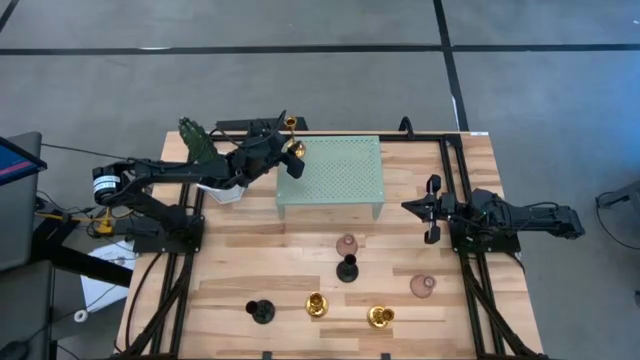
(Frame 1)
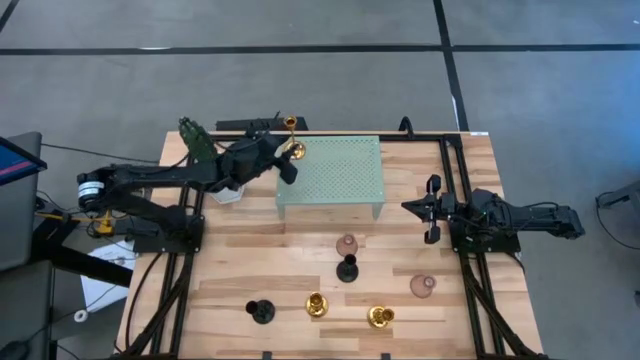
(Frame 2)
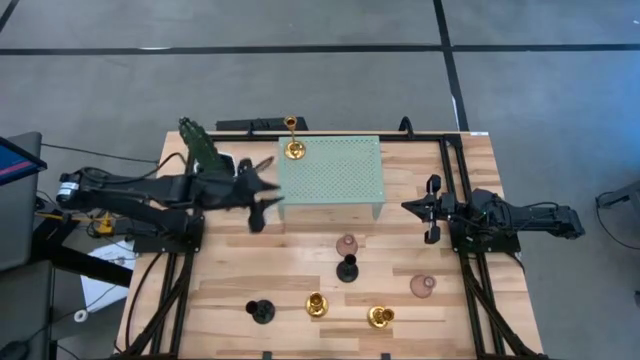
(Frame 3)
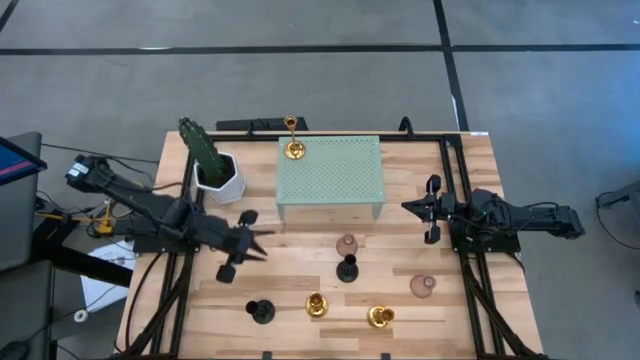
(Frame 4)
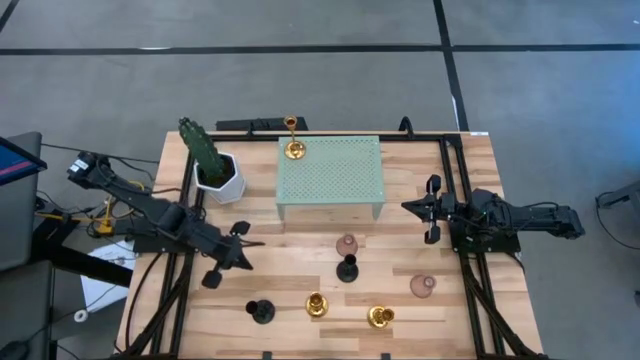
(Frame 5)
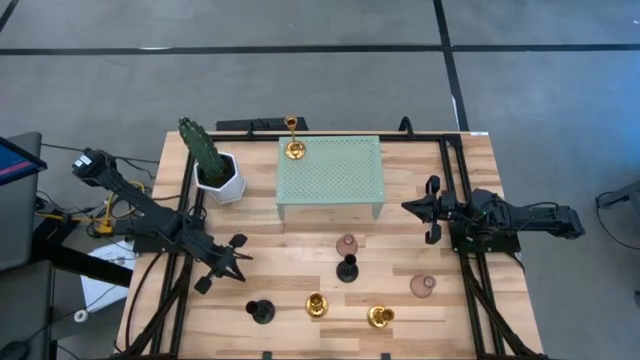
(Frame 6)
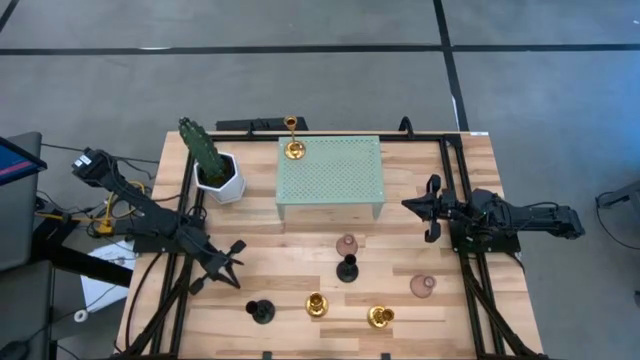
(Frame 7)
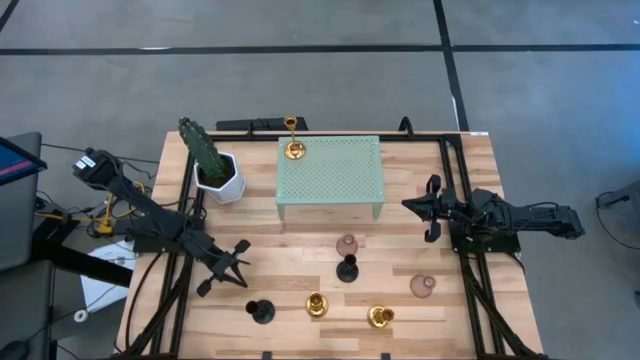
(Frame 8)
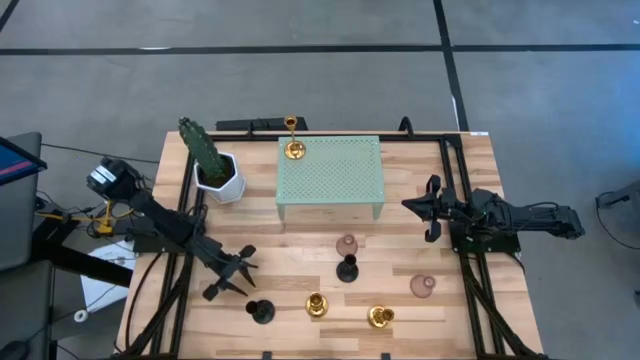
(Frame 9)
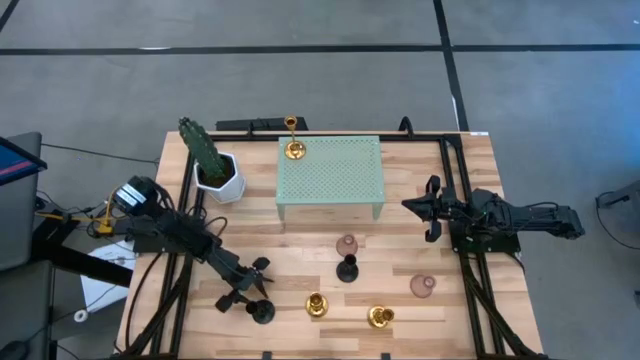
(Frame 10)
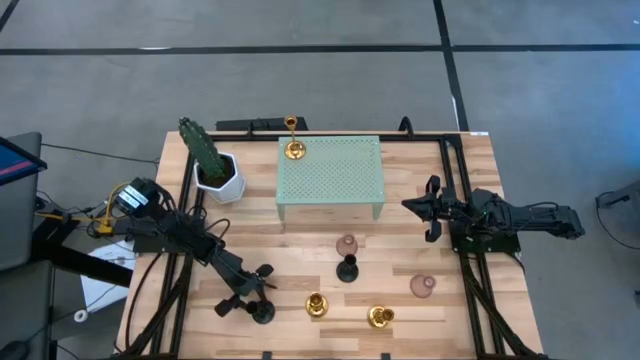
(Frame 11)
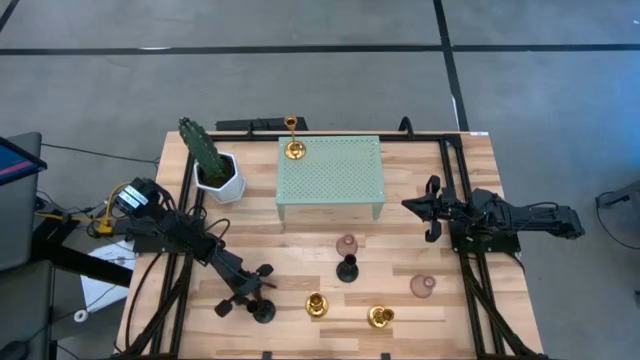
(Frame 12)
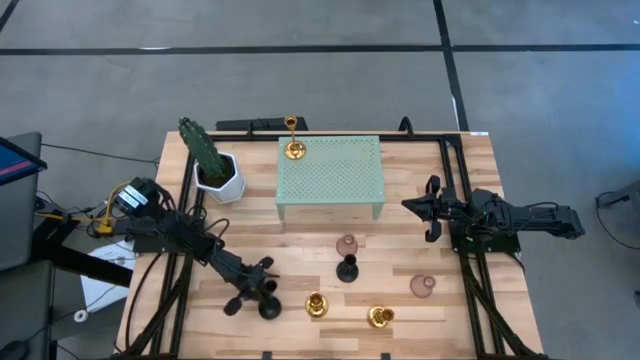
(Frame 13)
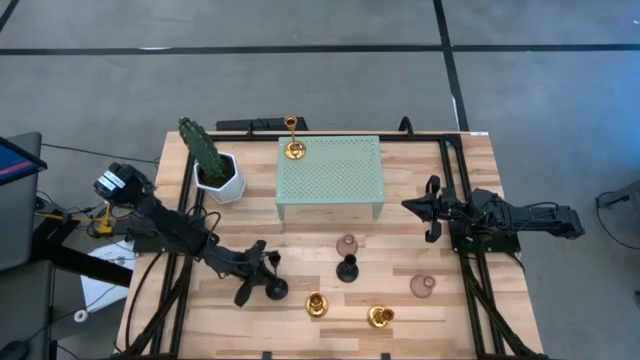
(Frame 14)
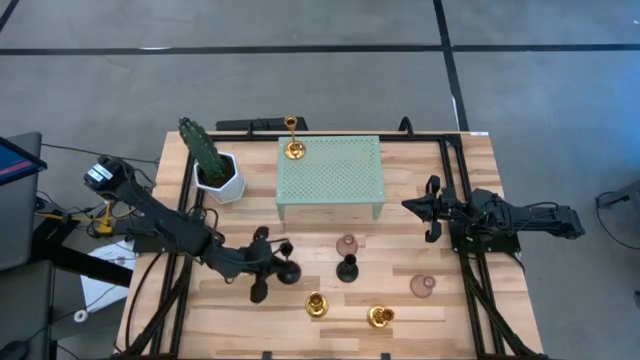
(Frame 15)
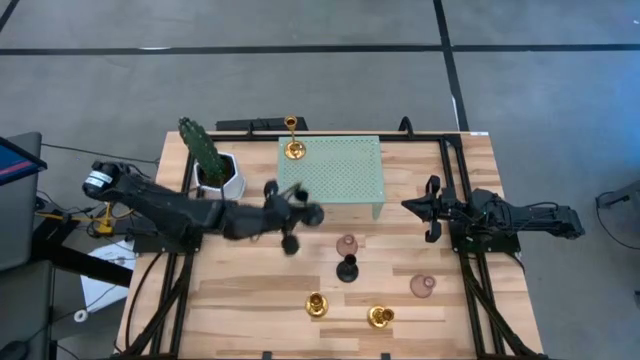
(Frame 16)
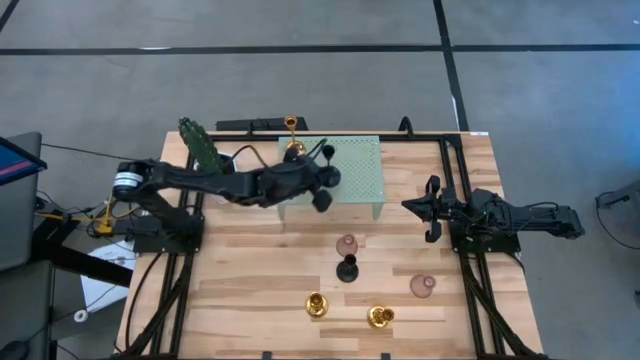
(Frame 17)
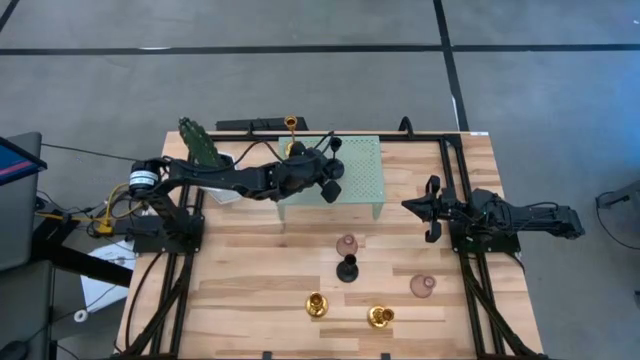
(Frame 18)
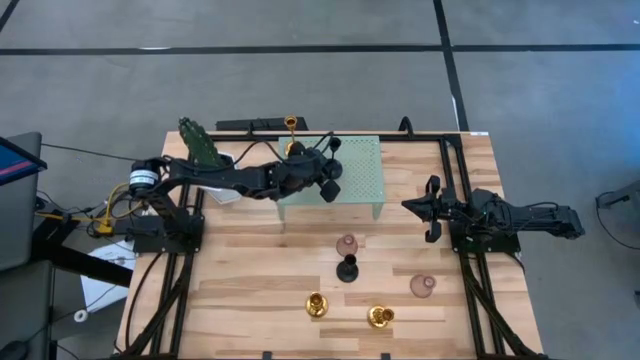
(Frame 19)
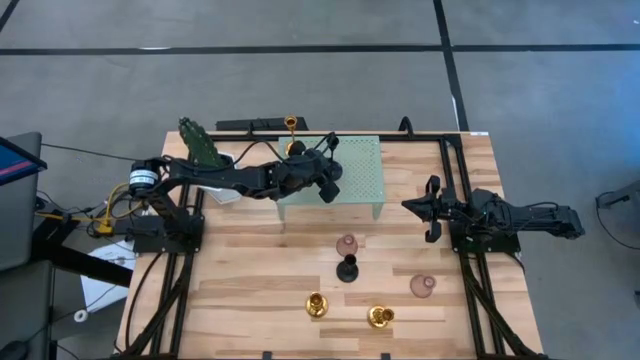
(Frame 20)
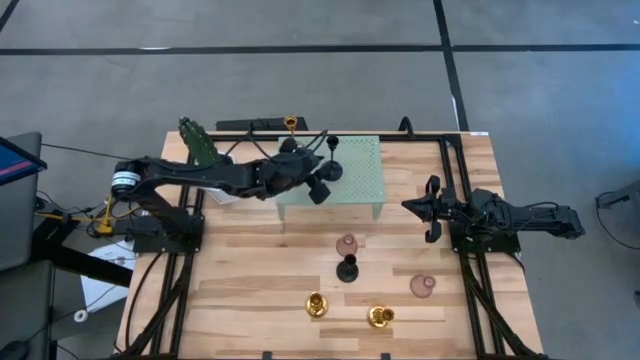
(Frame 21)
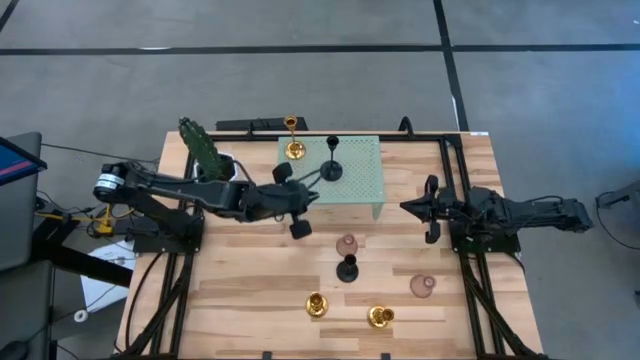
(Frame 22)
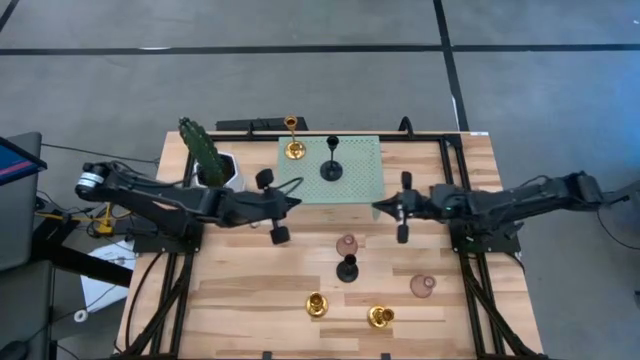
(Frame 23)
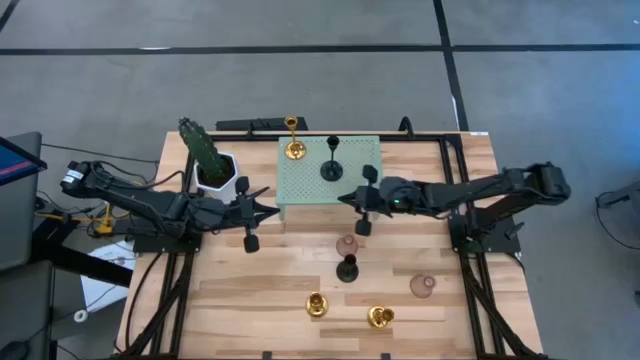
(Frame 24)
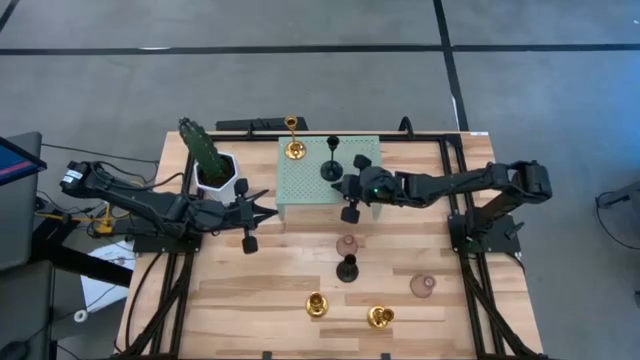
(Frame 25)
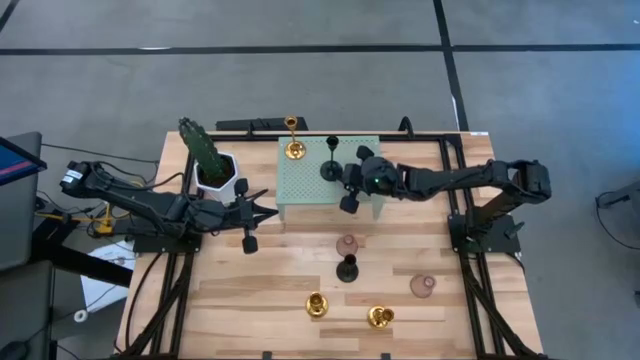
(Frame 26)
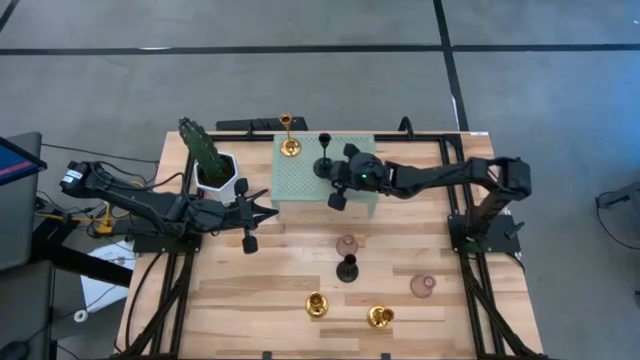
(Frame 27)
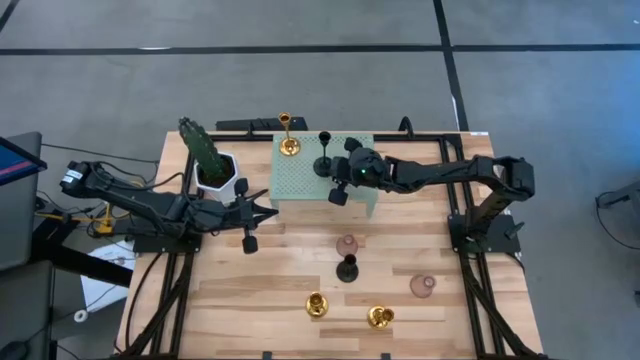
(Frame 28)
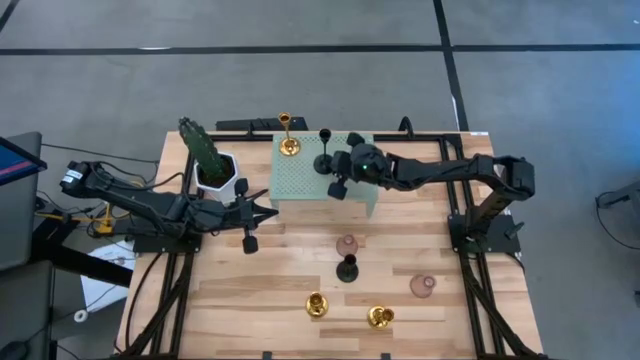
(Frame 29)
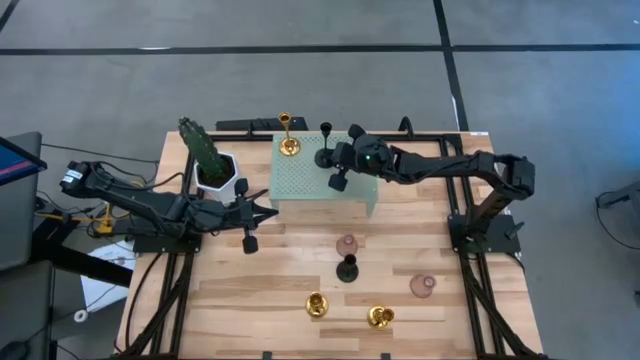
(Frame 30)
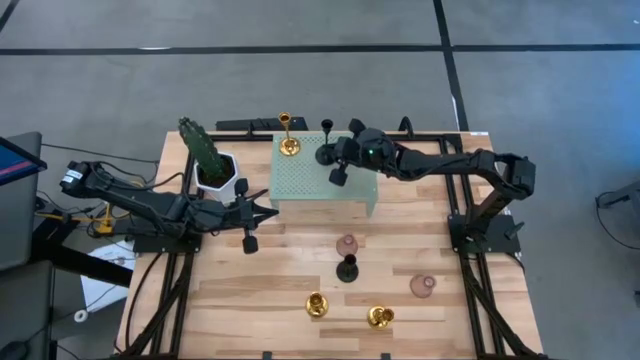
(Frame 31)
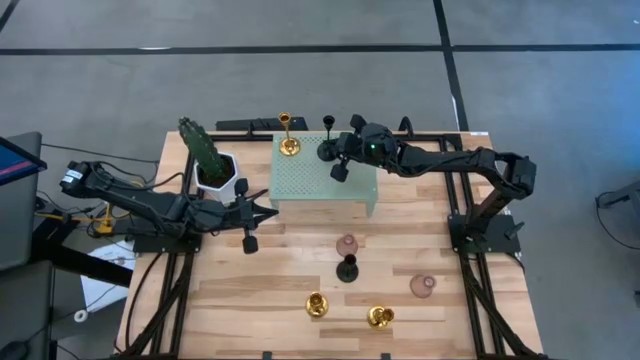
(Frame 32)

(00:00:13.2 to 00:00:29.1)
Task: Pick & Place candle stick holders
Put the left black candle holder on the shelf

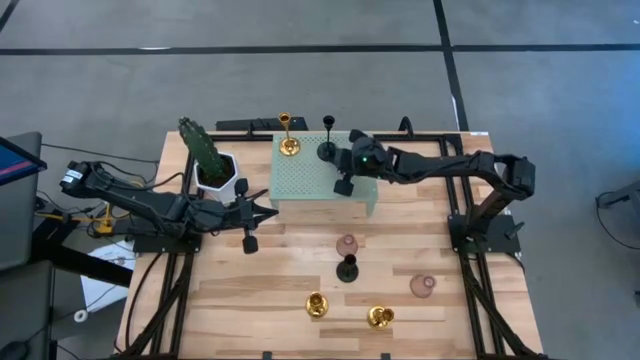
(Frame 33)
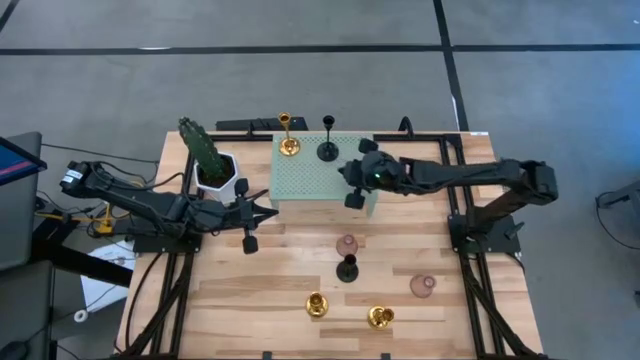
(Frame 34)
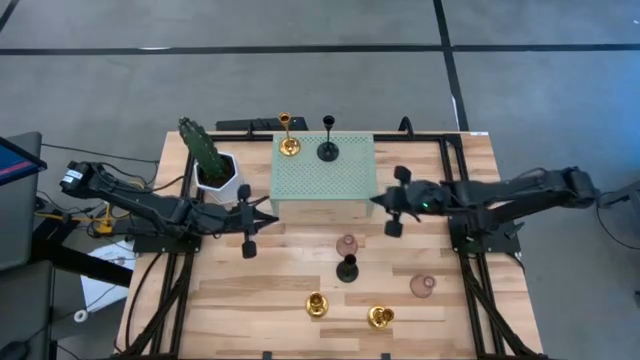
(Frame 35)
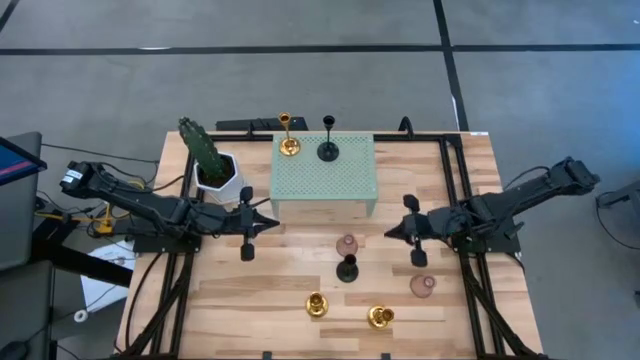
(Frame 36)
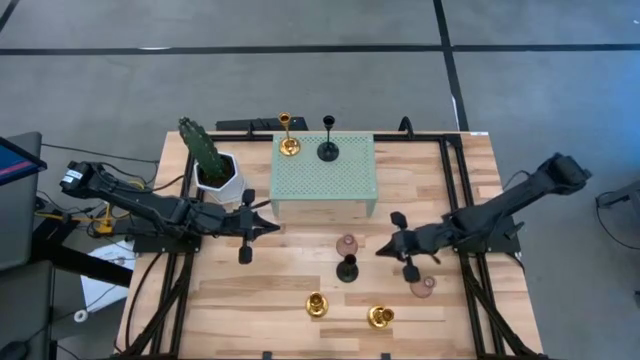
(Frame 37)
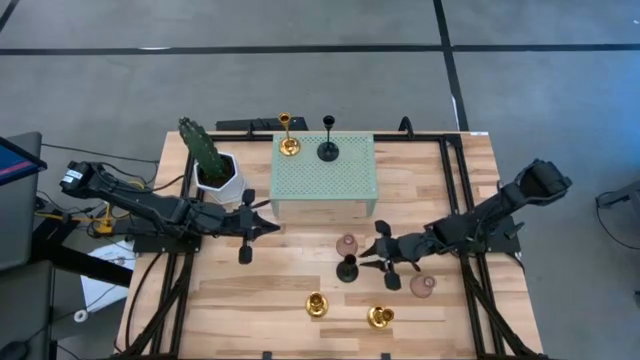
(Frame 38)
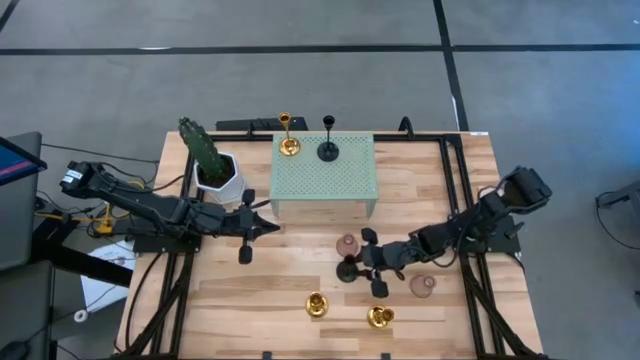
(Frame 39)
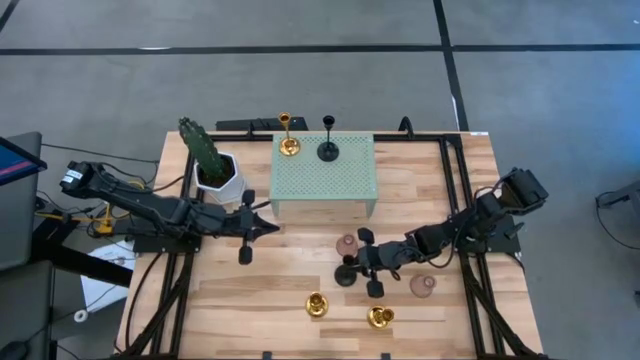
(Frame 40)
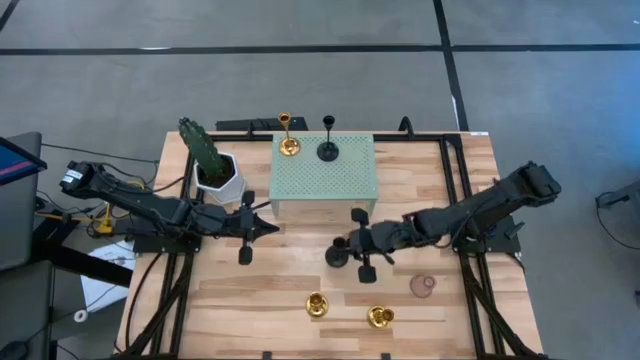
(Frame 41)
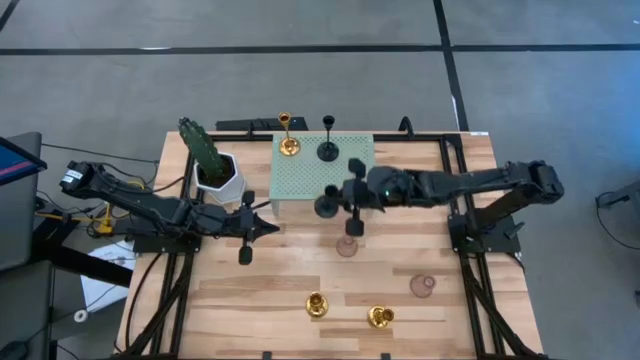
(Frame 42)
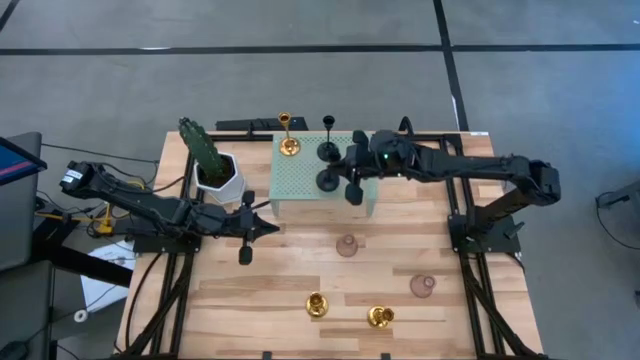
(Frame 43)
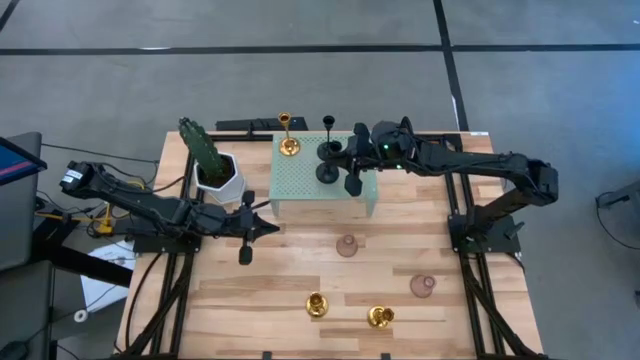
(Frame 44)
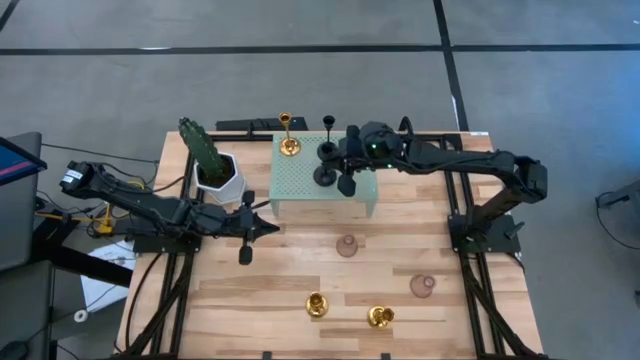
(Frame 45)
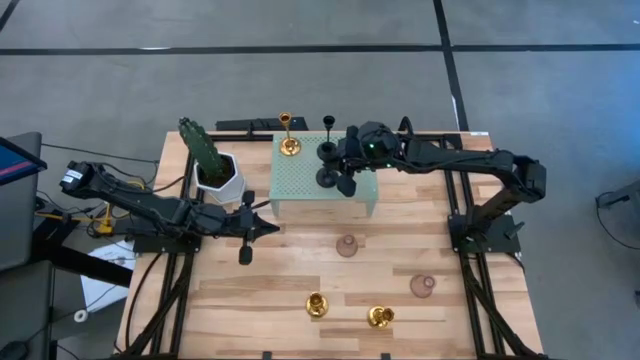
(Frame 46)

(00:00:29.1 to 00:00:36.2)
Put the black candle holder on the shelf
